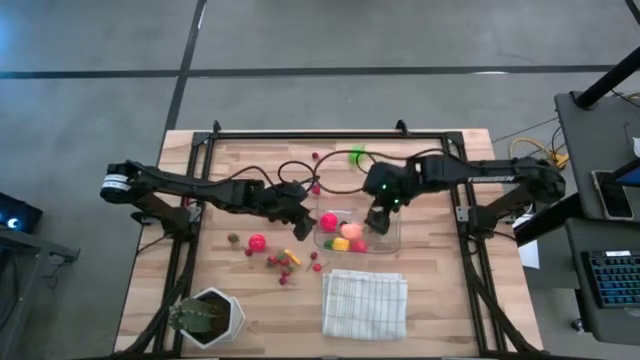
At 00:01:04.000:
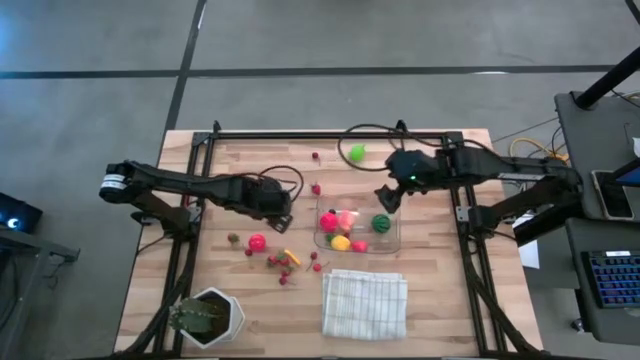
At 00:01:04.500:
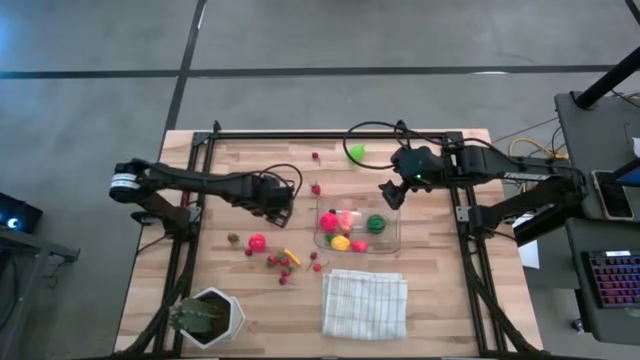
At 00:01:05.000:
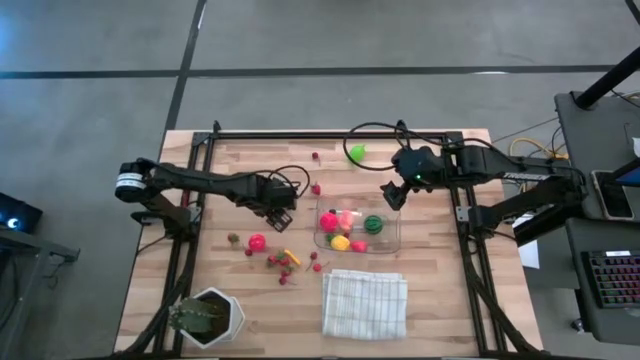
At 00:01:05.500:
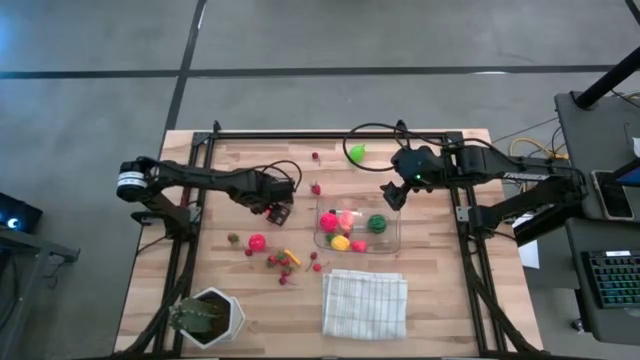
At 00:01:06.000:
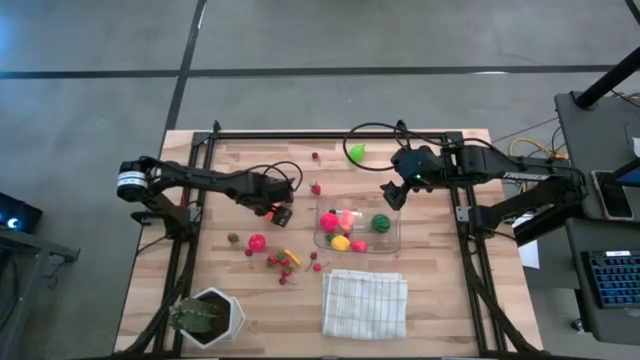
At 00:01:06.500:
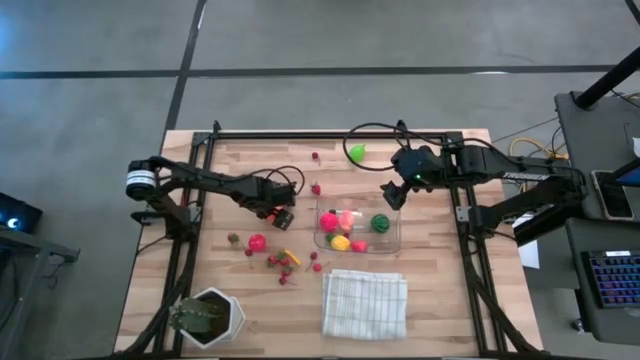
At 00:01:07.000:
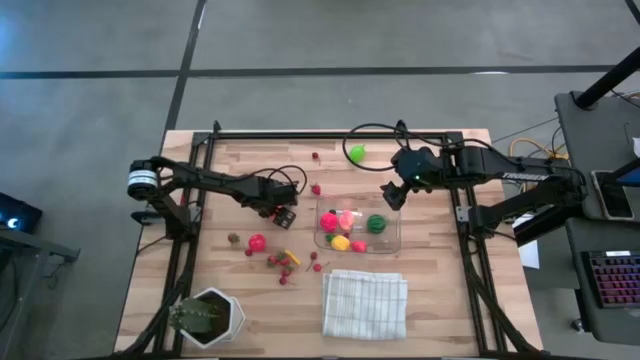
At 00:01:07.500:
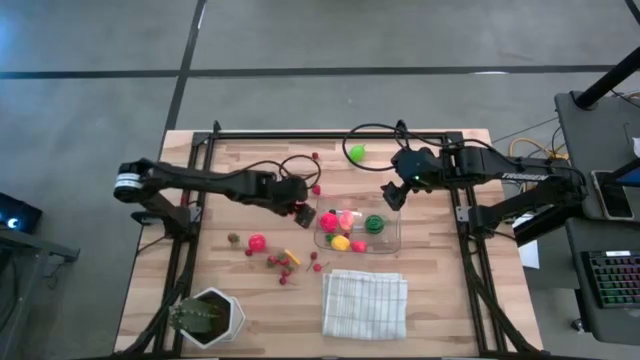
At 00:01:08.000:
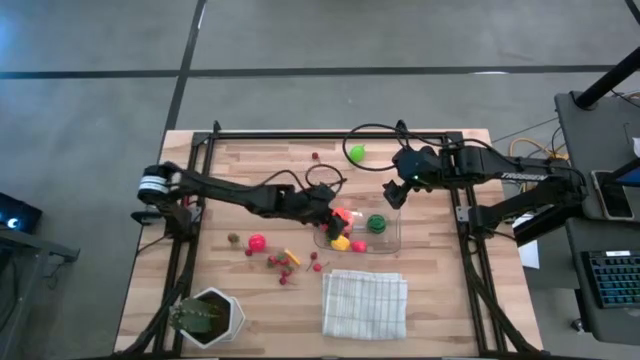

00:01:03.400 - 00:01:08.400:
Task: Pick and placing Produce into tupperware
Put the orange pumpkin into the transparent bin

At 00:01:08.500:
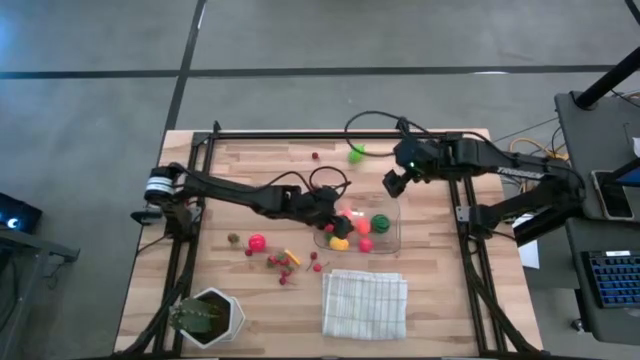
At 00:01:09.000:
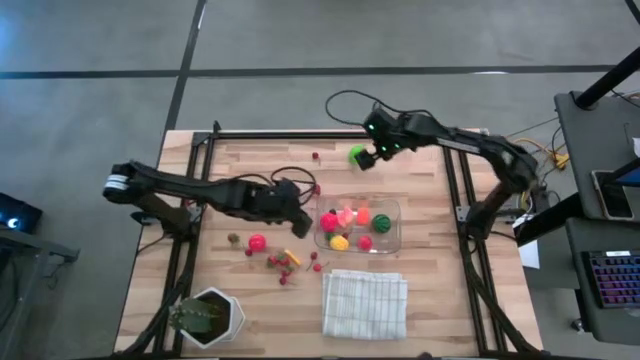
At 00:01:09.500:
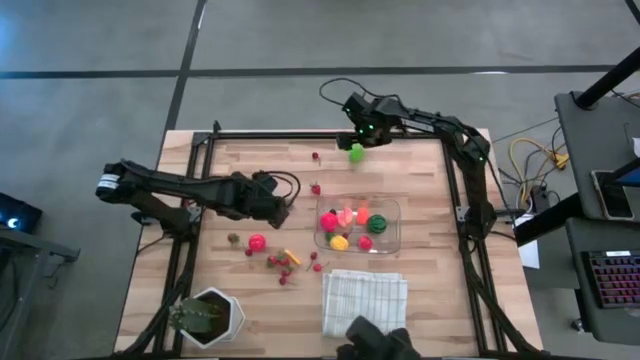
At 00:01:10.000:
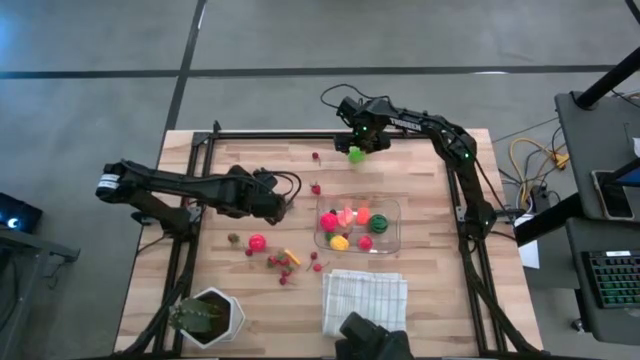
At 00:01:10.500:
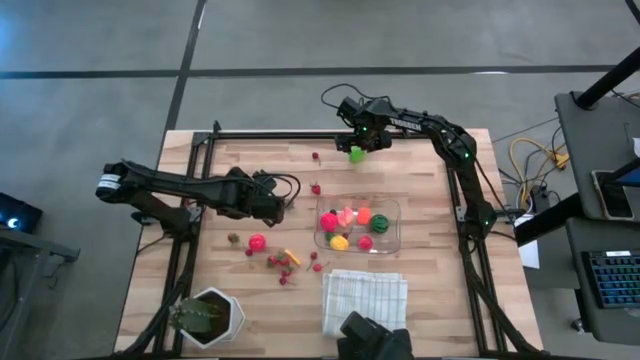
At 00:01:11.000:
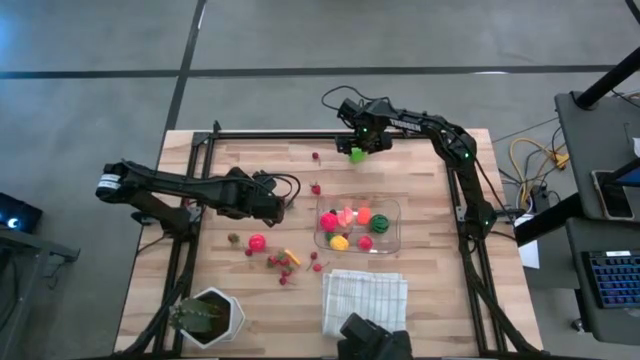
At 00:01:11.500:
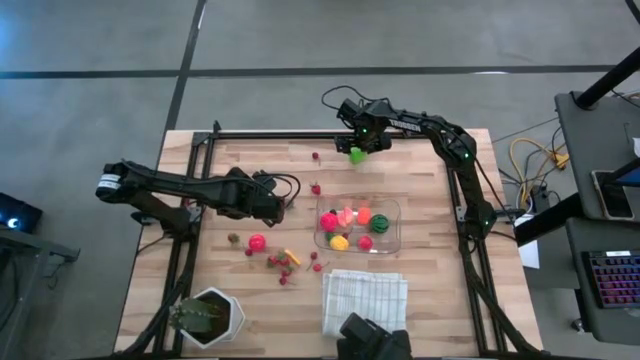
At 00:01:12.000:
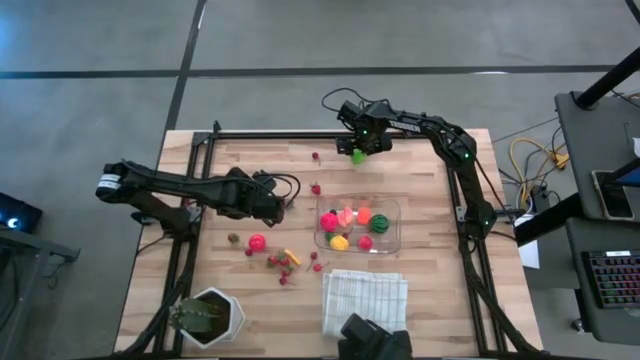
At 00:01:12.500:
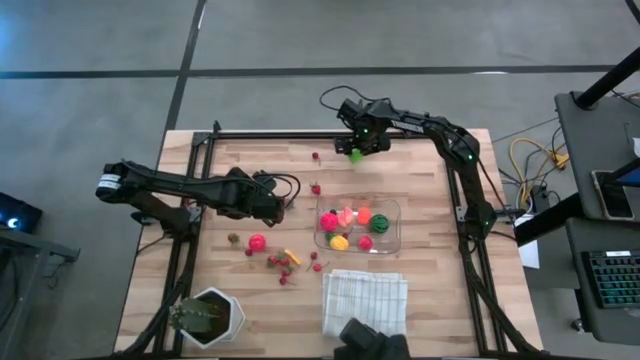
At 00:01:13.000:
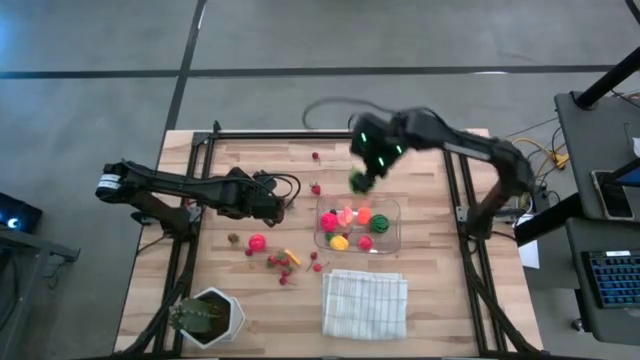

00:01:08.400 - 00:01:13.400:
Put the green cabbage into the transparent bin

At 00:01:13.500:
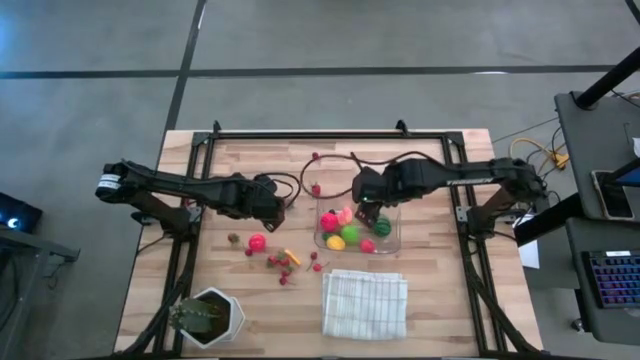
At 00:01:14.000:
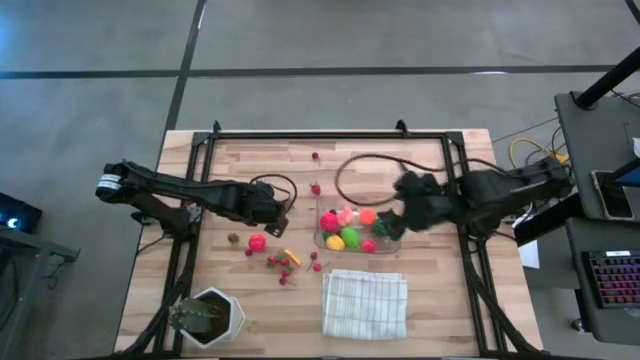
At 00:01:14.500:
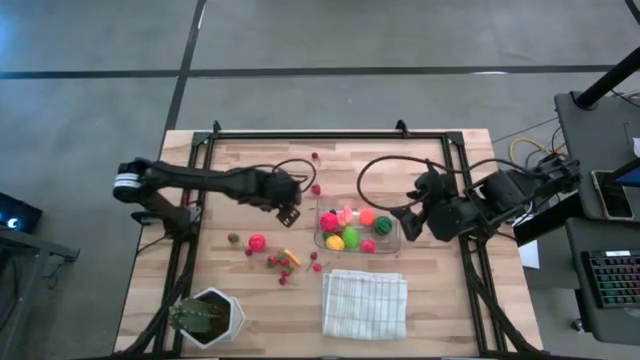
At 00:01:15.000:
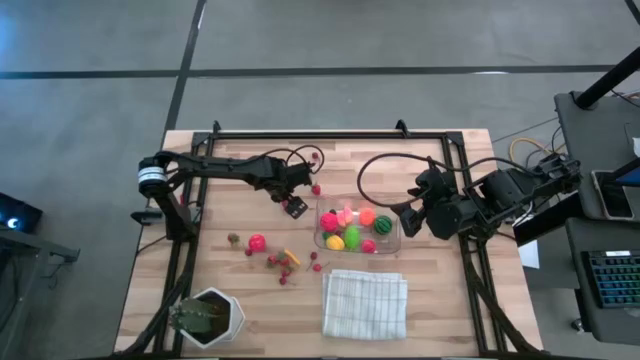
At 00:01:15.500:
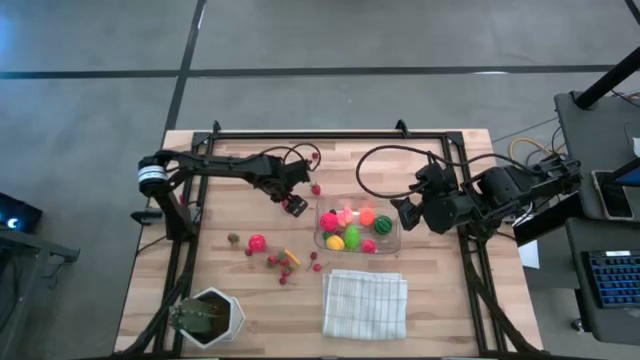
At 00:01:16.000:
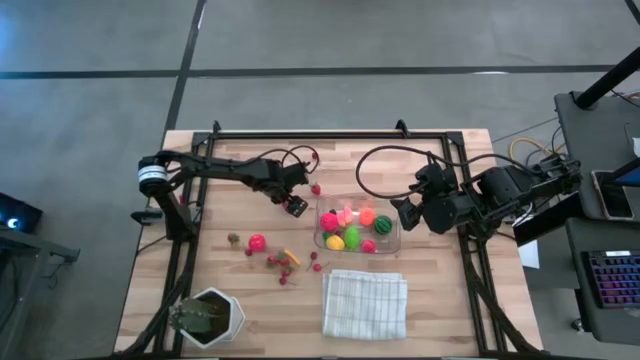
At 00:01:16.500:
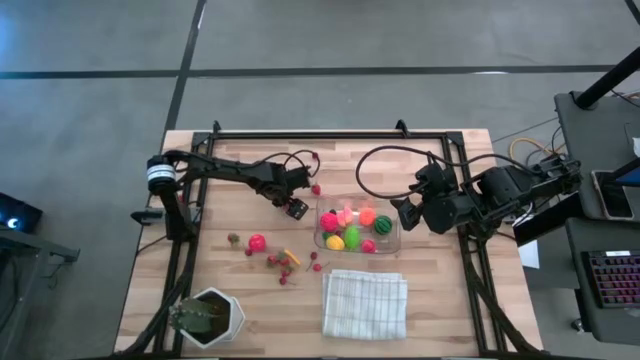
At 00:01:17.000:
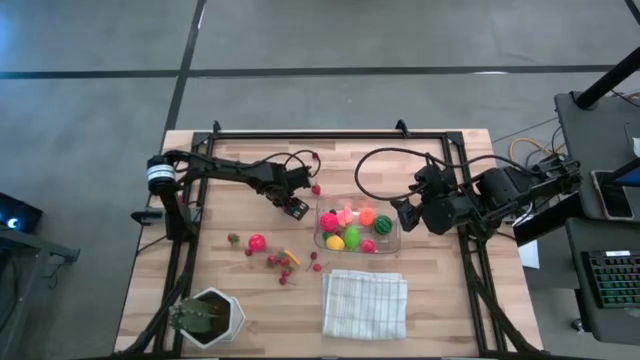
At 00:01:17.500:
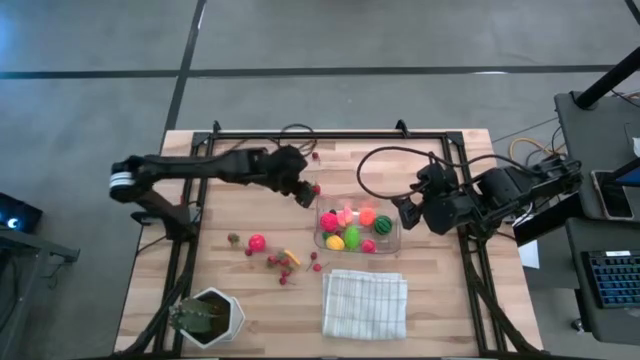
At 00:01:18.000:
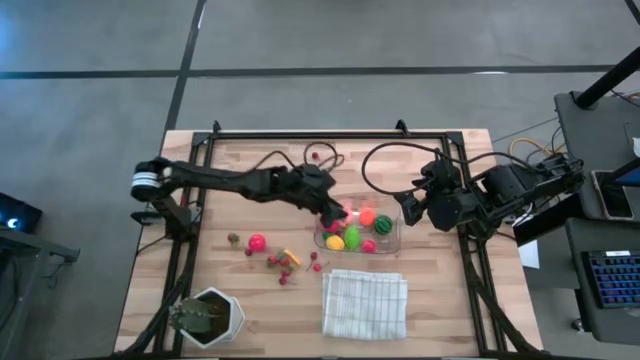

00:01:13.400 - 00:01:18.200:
Put the red strawberry into the transparent bin

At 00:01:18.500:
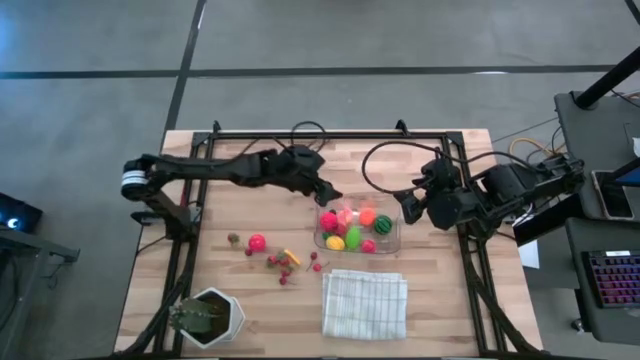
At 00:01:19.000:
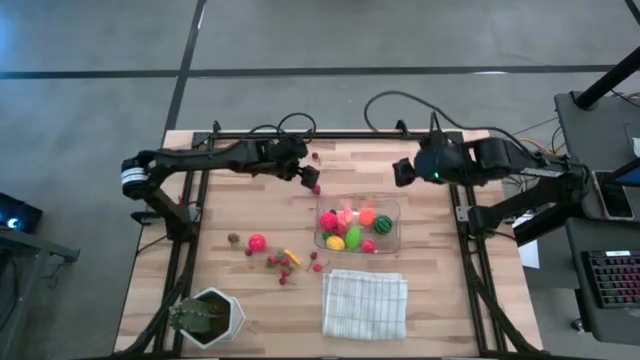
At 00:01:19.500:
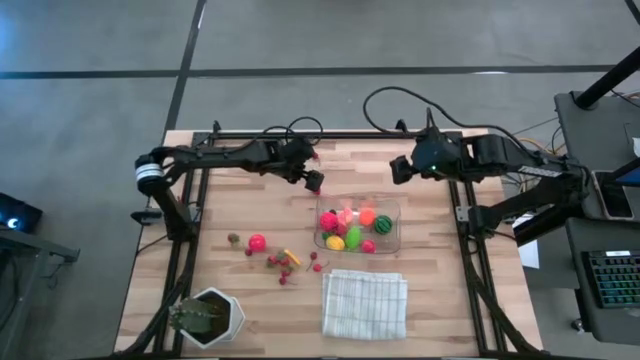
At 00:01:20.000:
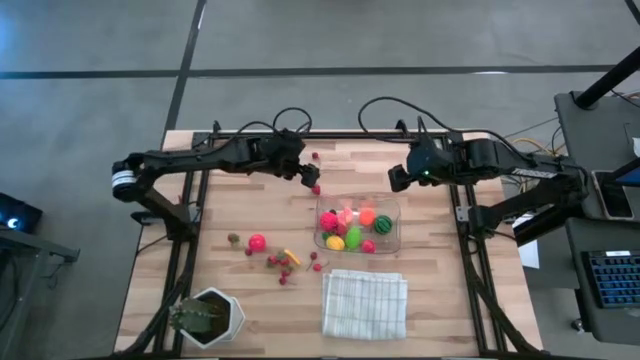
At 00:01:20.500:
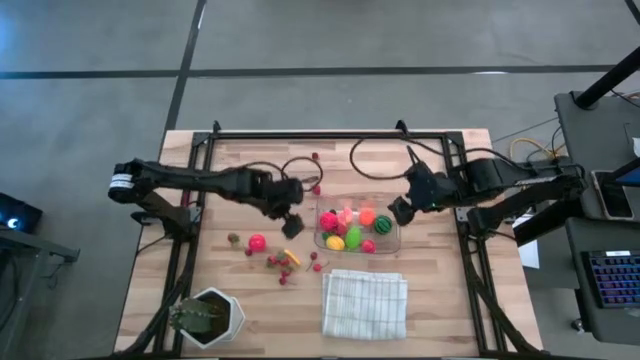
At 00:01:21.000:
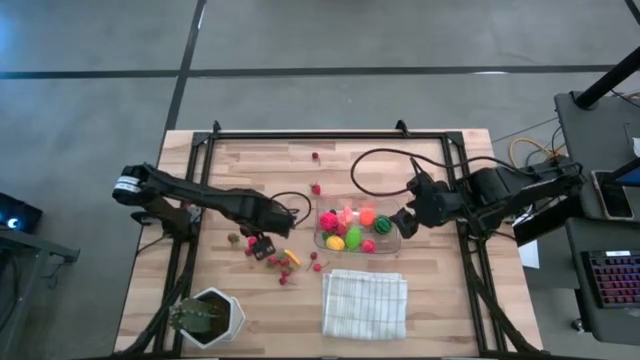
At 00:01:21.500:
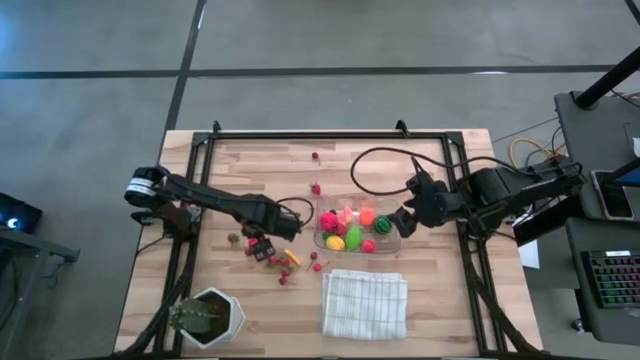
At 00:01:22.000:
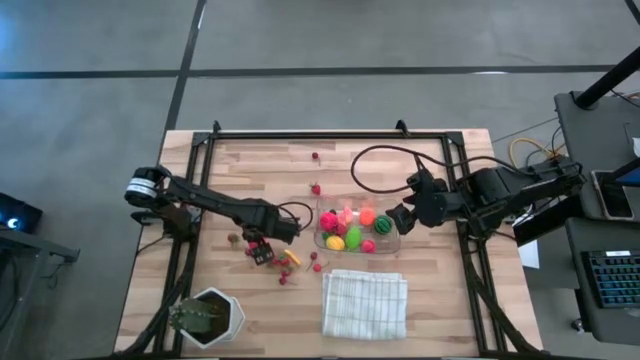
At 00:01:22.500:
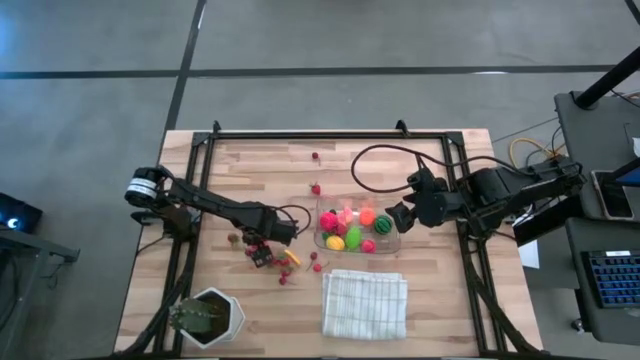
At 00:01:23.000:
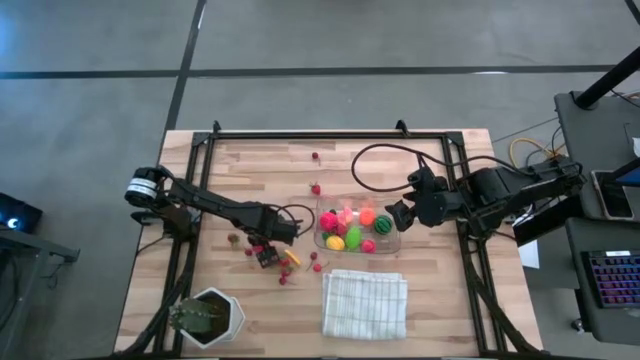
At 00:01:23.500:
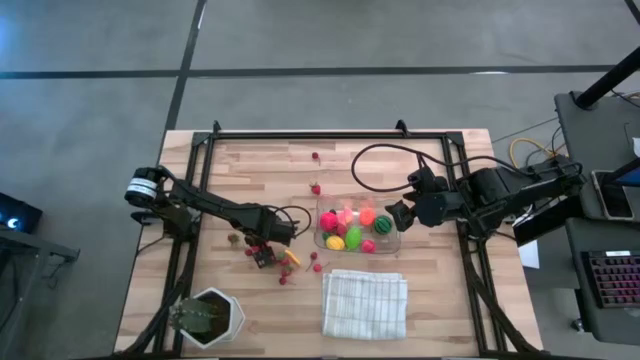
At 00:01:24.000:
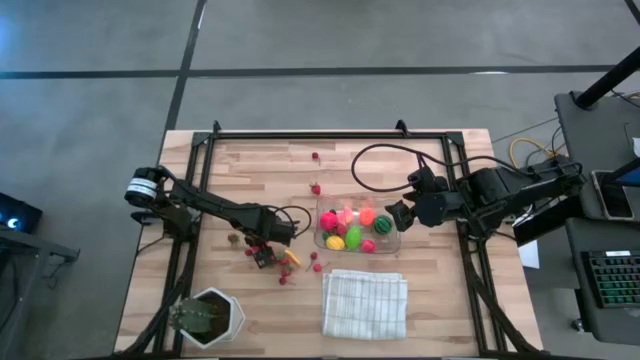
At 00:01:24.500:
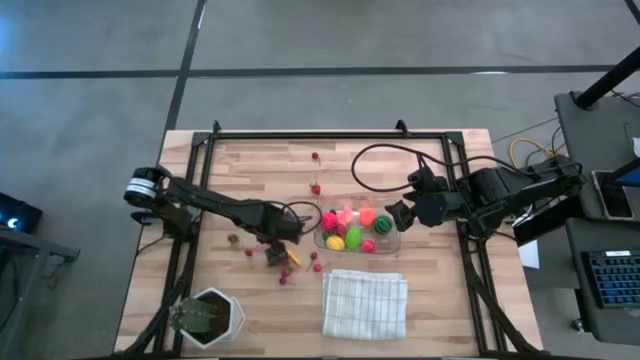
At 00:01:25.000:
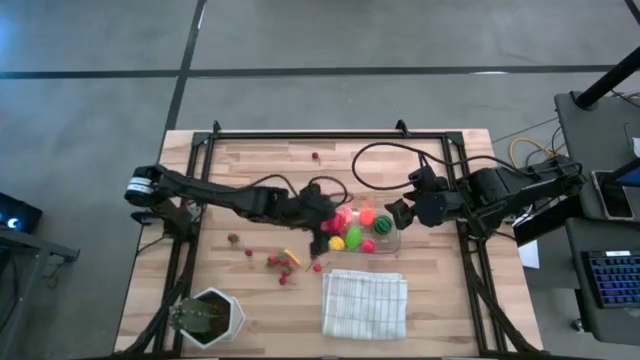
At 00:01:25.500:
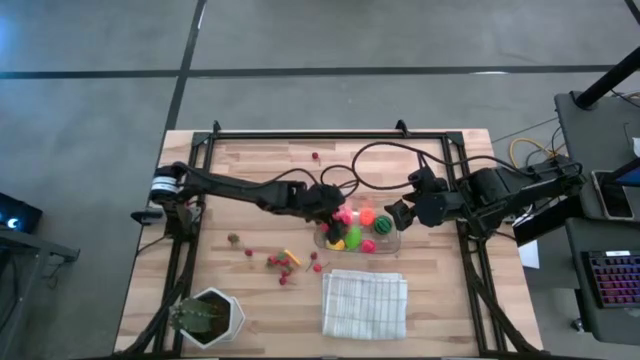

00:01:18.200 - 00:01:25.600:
Put the red tomato into the transparent bin
